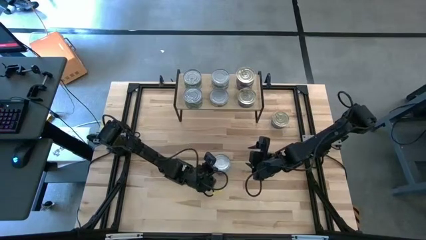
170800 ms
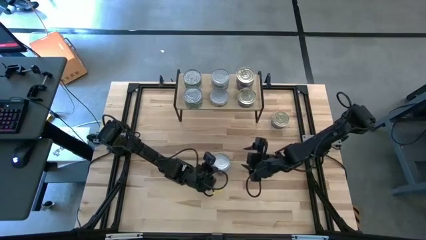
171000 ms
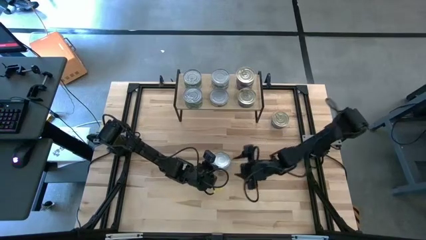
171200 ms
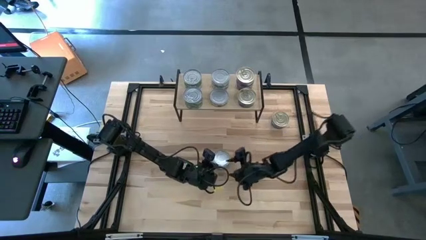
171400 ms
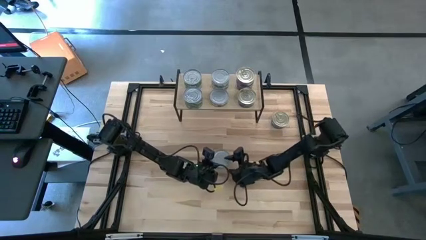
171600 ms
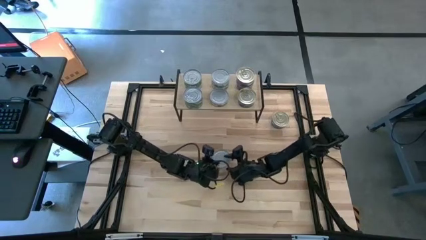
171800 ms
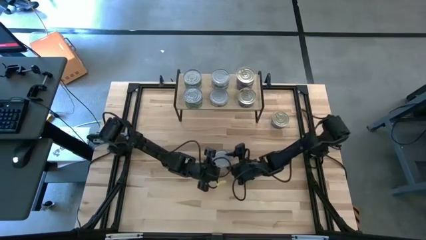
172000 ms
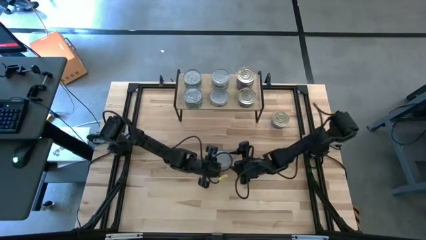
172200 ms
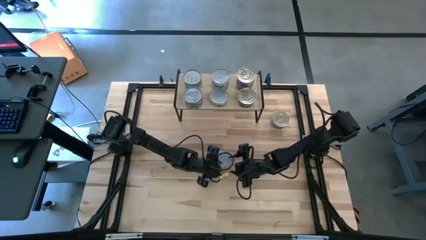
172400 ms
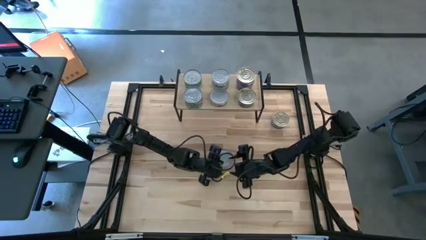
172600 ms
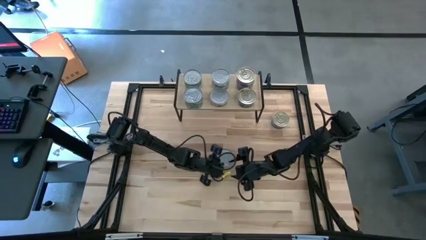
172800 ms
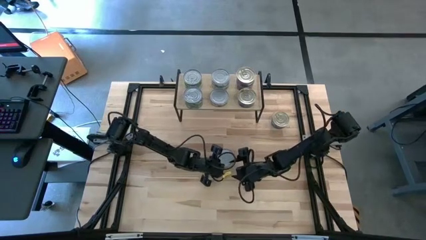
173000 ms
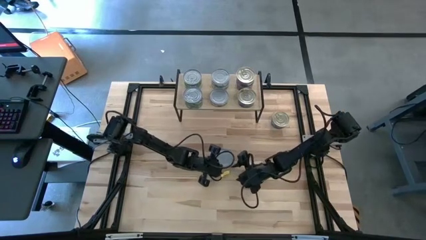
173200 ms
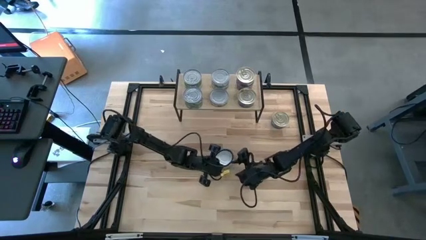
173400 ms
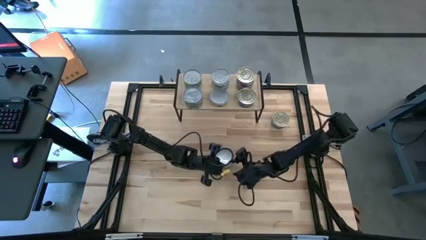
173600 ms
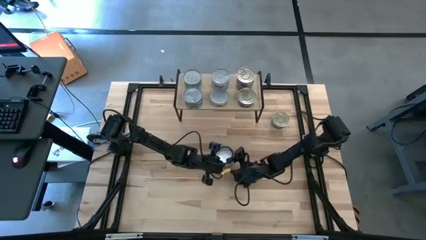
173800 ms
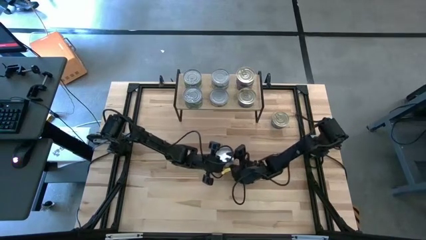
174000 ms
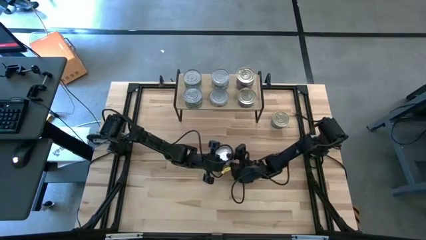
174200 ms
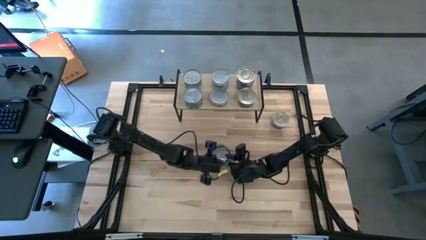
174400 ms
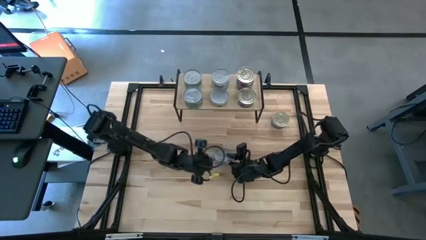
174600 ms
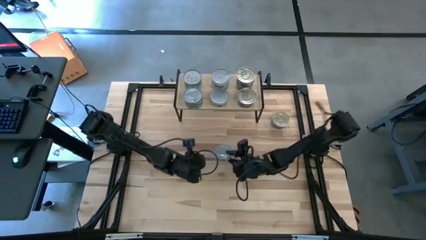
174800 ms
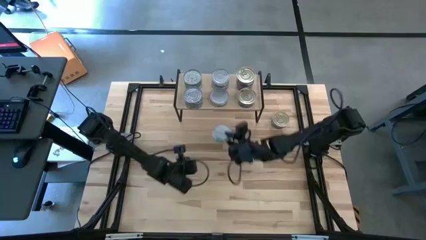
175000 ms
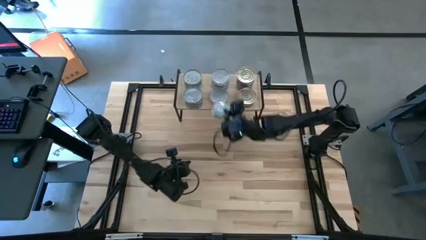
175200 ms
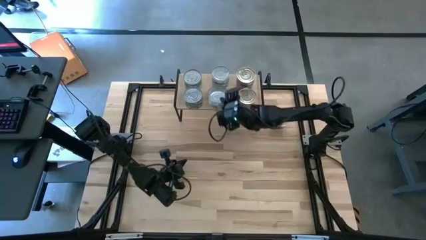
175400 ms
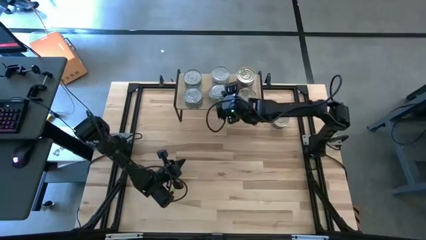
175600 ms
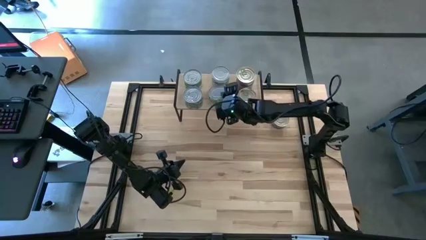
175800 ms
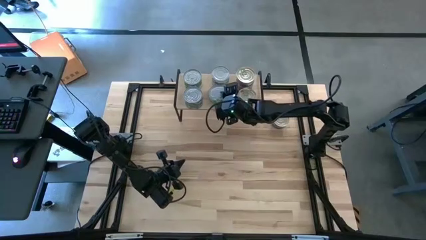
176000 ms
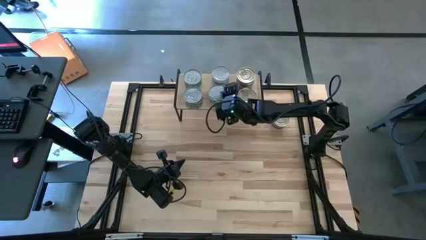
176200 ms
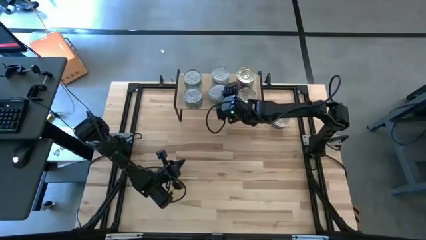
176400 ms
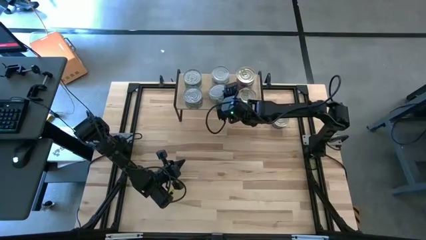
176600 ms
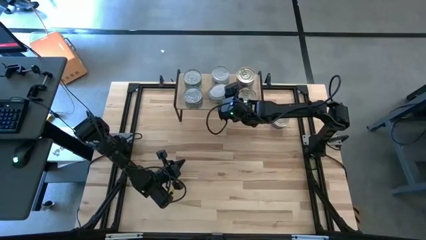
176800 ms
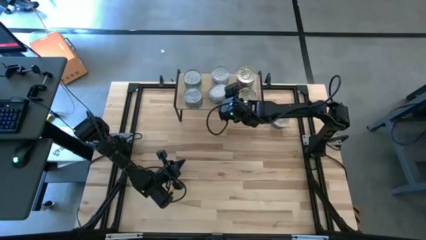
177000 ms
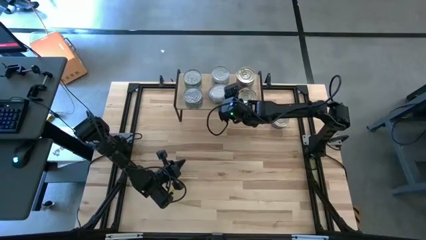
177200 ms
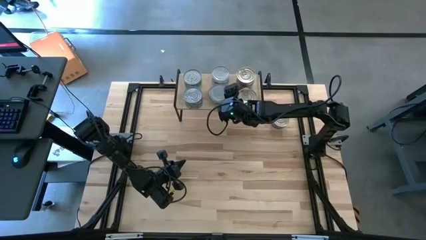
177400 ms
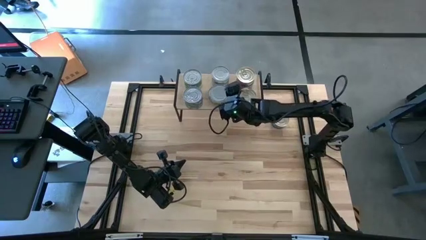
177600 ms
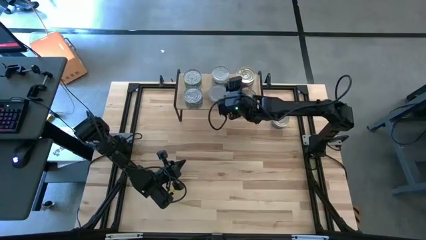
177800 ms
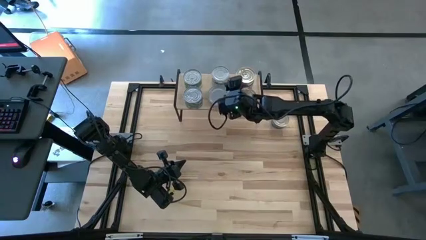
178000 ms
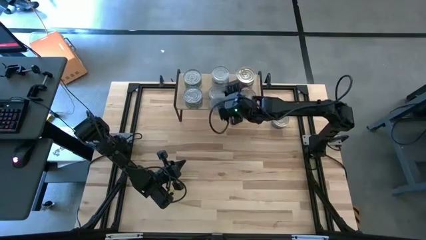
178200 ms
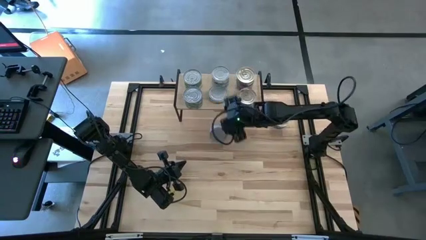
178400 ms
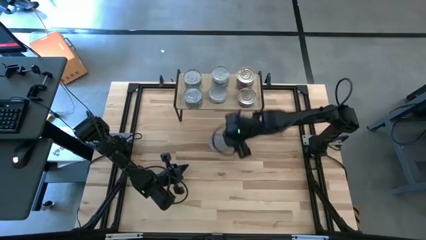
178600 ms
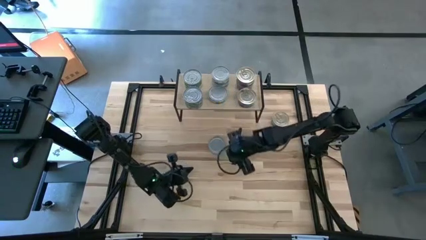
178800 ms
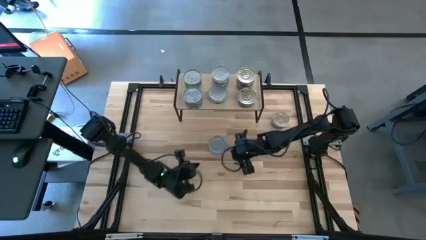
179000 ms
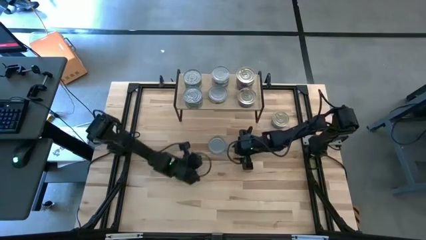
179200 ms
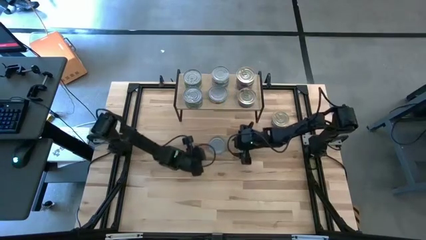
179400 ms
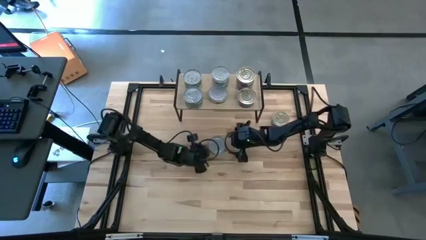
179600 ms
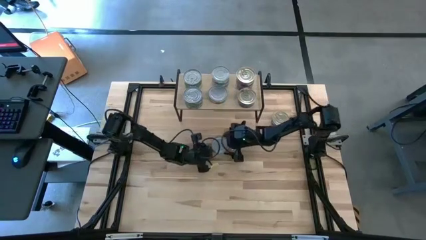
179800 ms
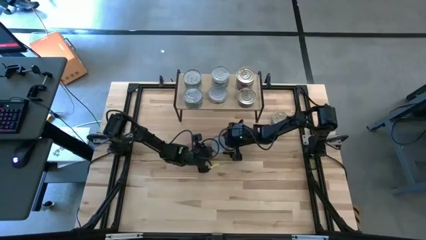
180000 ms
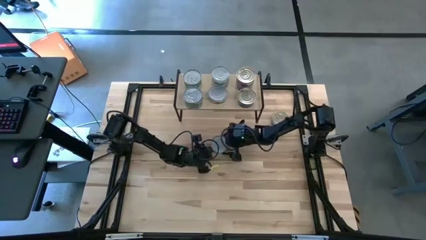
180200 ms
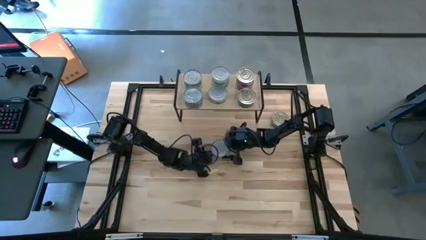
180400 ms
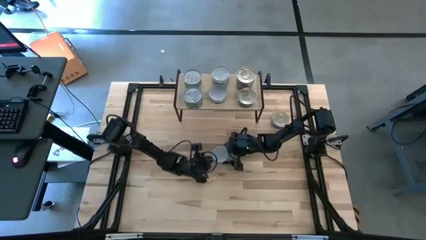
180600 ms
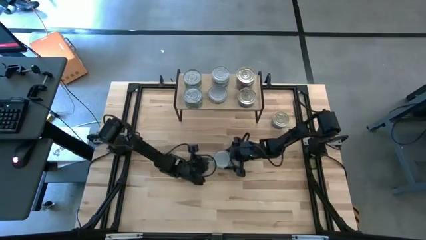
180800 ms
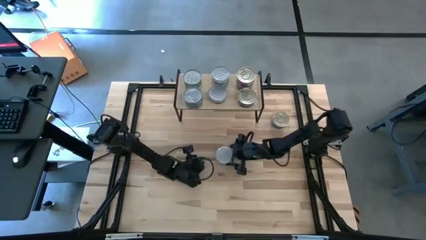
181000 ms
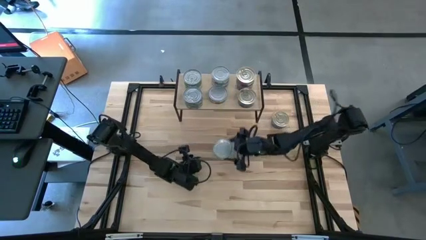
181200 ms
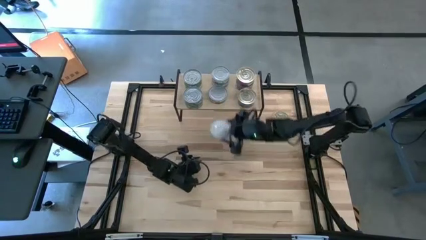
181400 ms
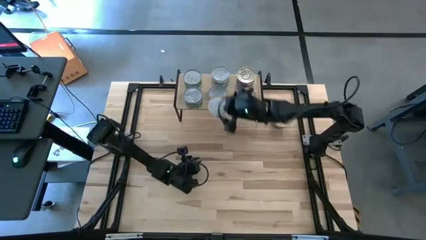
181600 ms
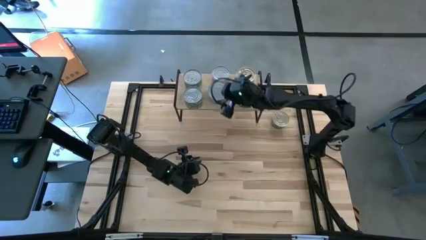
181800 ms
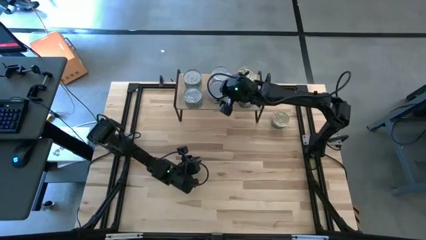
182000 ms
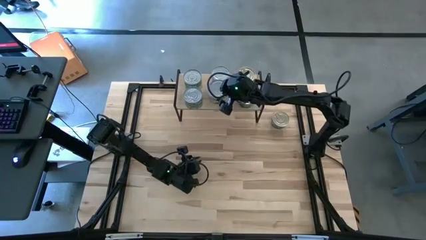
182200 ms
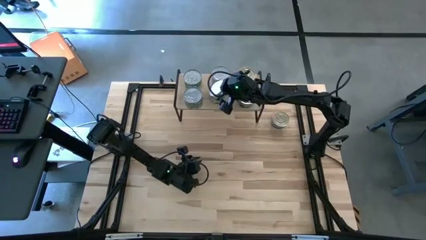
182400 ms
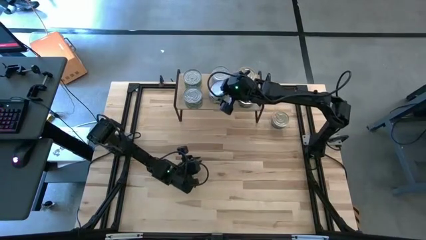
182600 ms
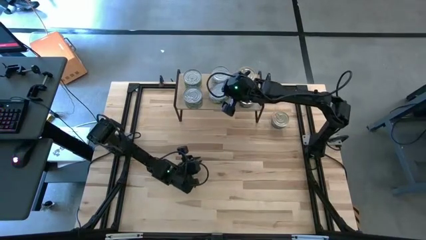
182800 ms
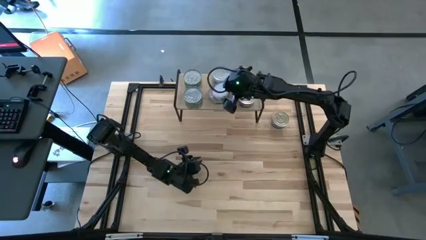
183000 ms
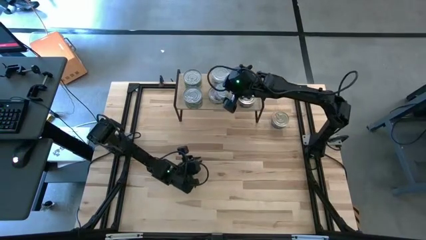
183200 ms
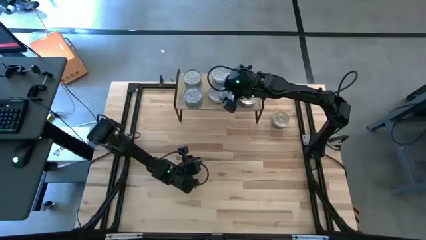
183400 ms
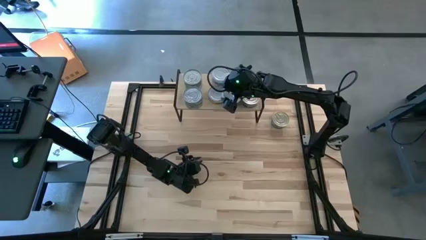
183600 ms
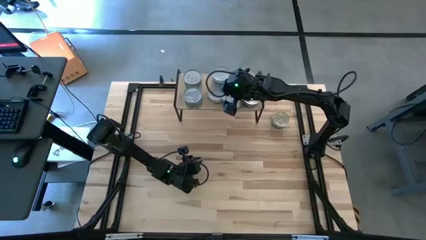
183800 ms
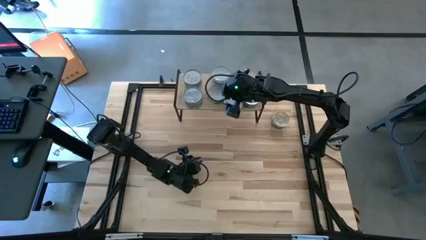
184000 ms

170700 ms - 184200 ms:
Task: Stack canned seafood by type on shelf
Stack the light green tuna can on top of the bottom light green tuna can on the shelf

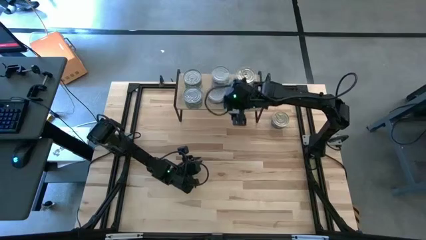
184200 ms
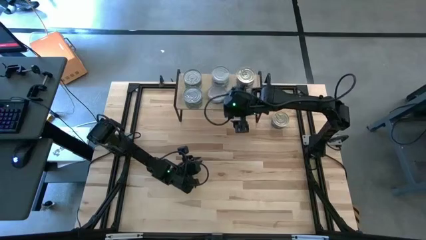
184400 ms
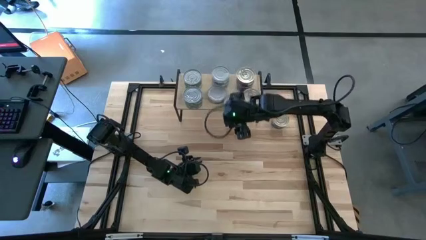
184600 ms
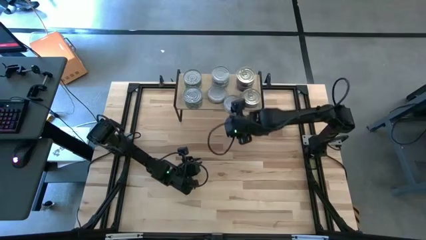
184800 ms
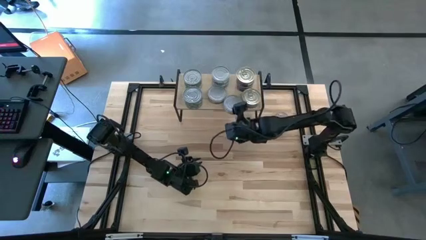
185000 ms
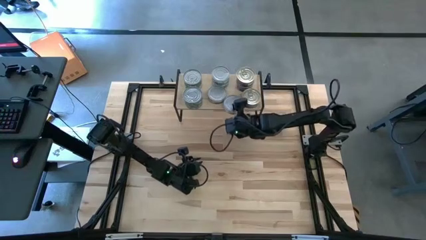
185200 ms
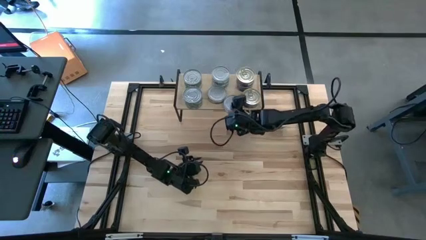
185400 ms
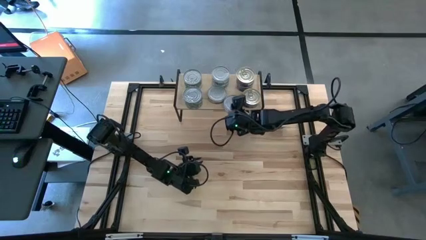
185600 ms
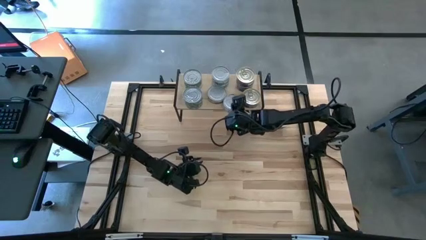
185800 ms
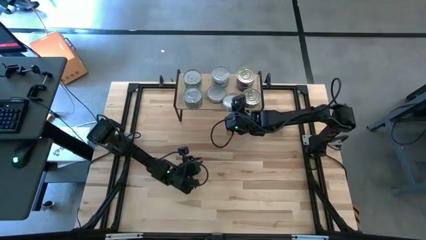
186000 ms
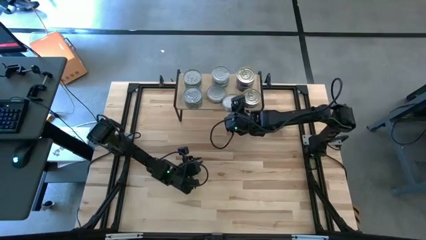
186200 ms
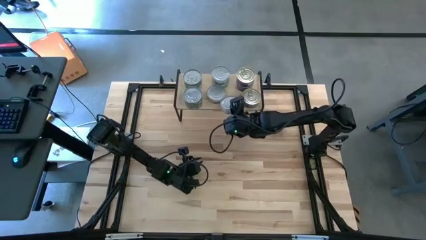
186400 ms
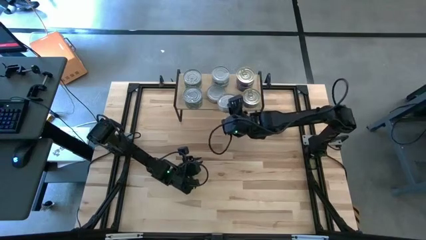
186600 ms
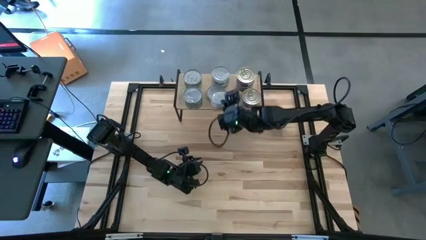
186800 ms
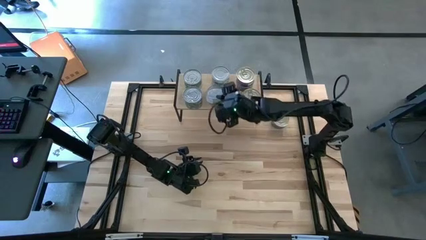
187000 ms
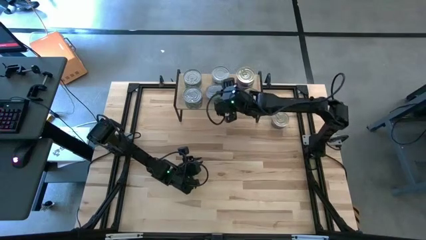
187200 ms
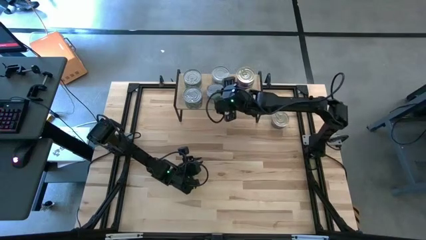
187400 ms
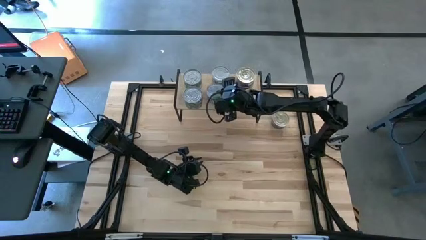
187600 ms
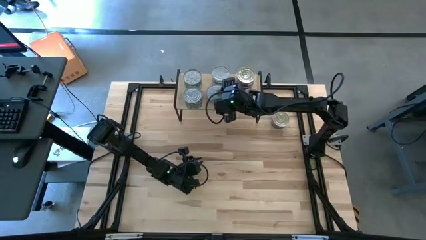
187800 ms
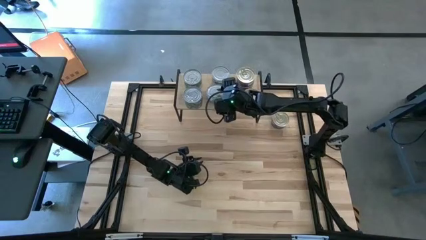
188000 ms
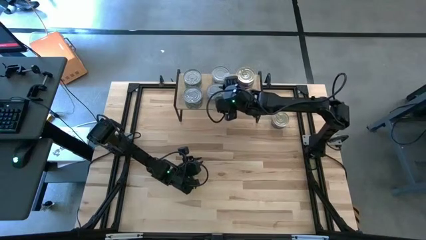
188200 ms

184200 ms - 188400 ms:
Stack the light green tuna can on top of the bottom light green tuna can on the shelf
